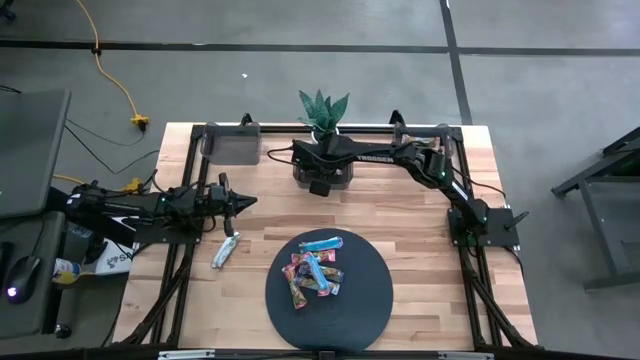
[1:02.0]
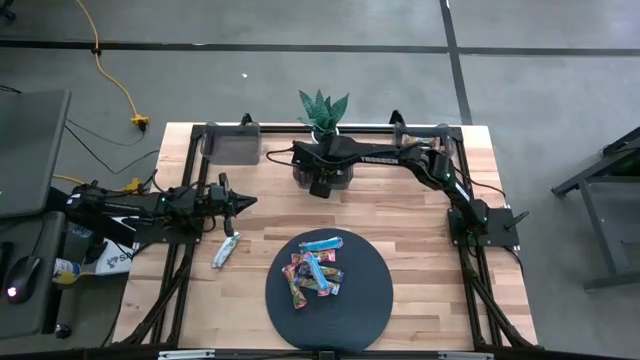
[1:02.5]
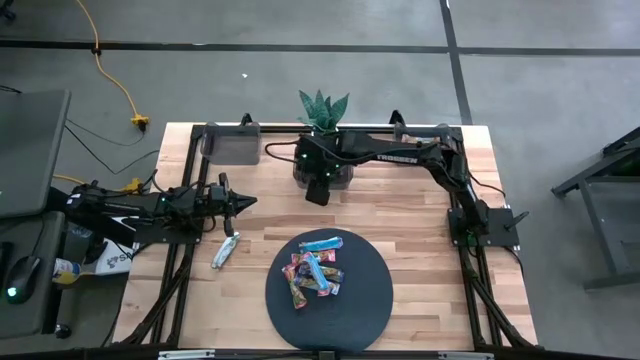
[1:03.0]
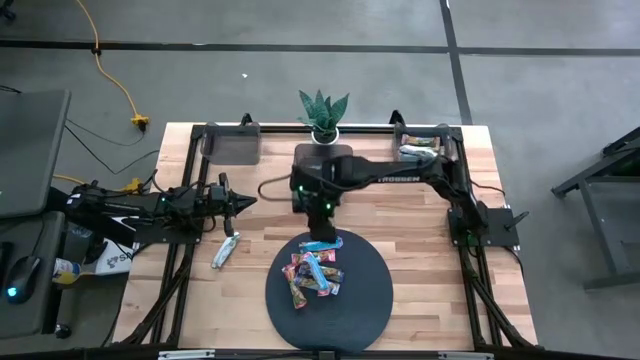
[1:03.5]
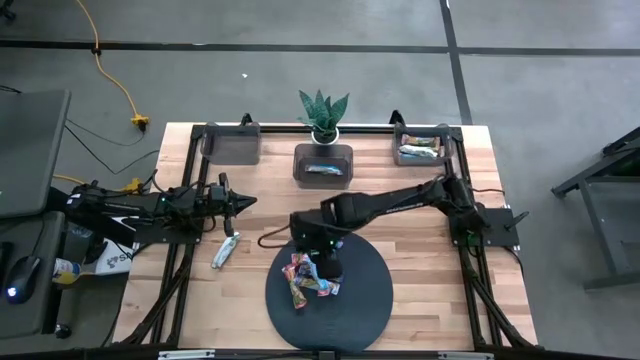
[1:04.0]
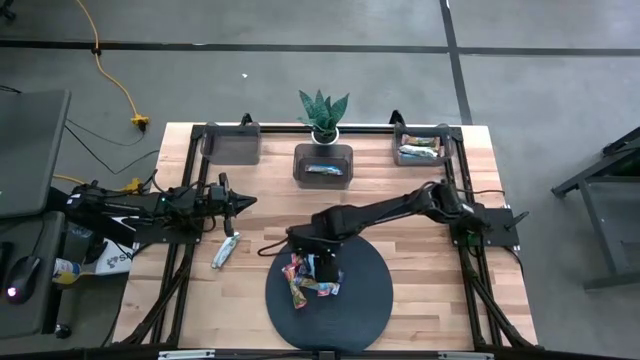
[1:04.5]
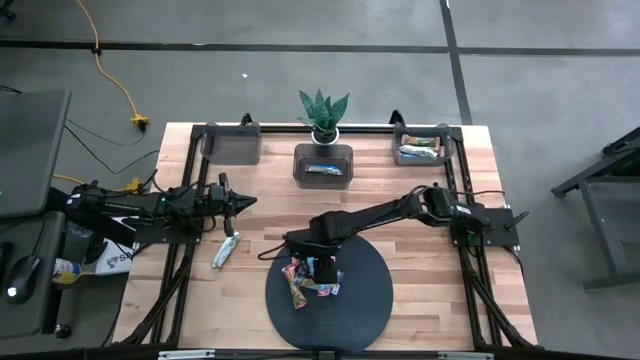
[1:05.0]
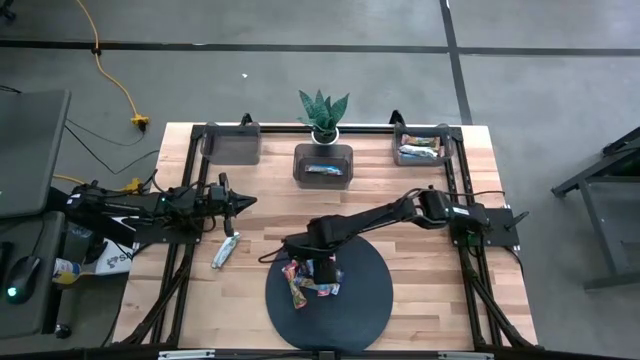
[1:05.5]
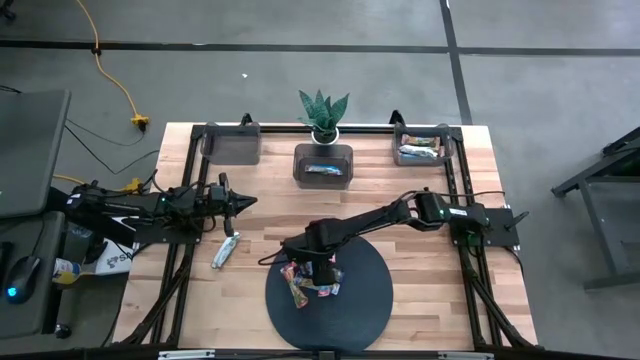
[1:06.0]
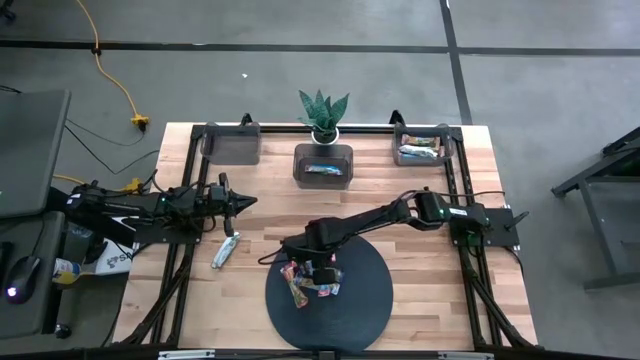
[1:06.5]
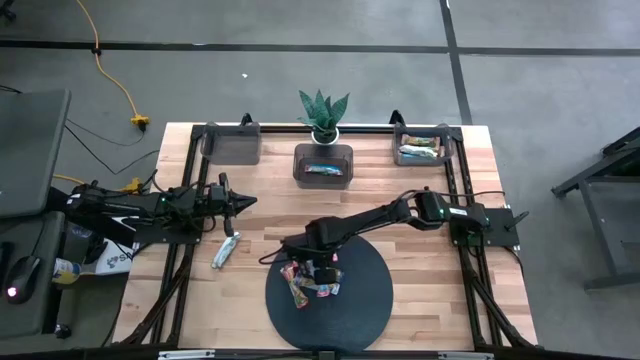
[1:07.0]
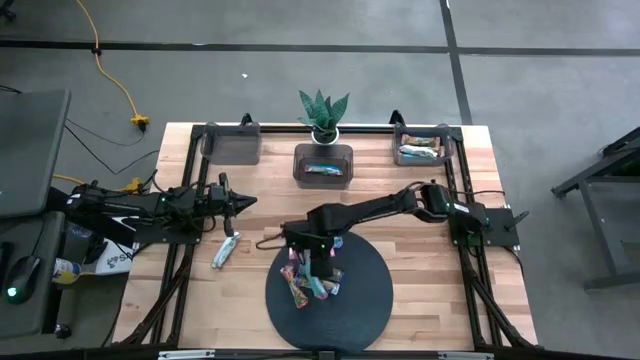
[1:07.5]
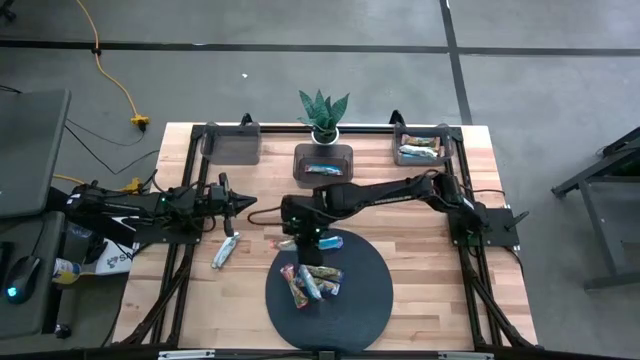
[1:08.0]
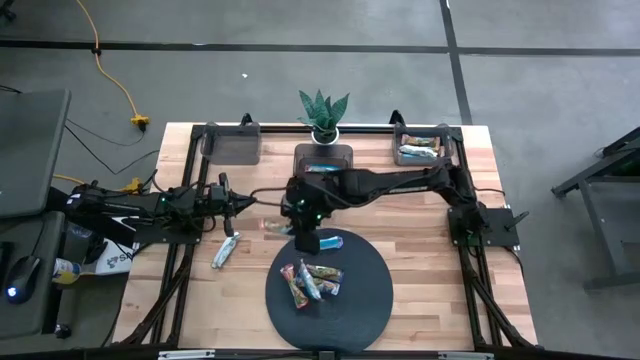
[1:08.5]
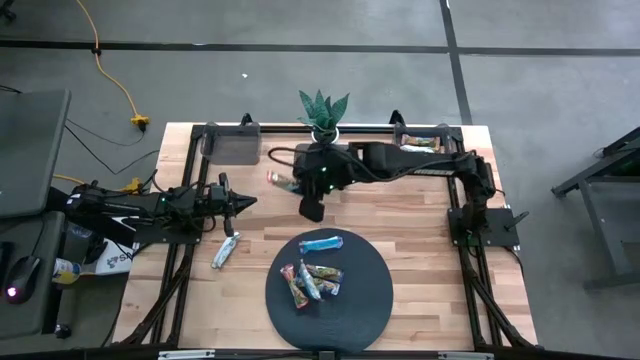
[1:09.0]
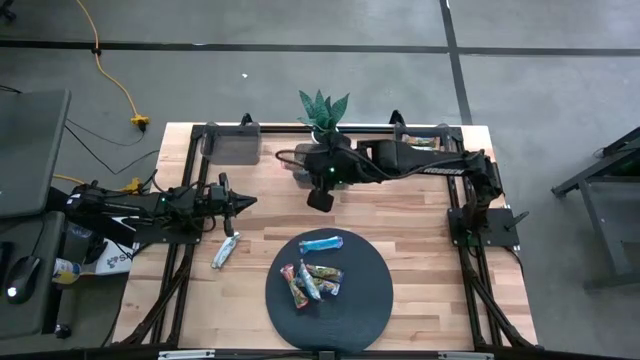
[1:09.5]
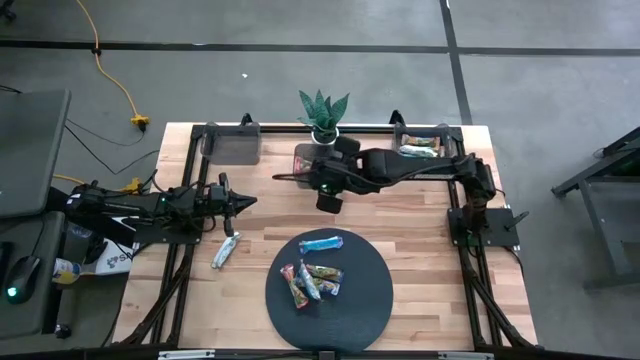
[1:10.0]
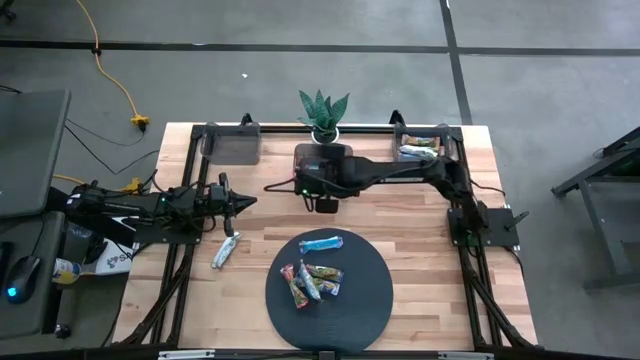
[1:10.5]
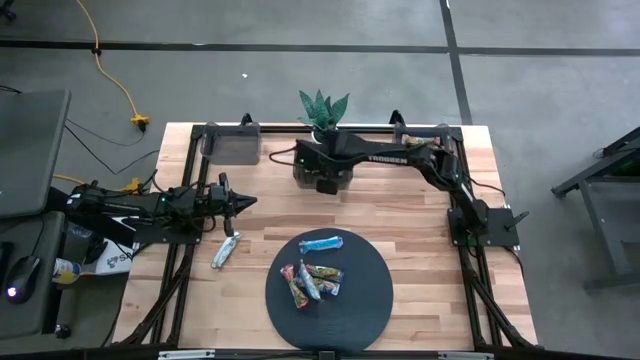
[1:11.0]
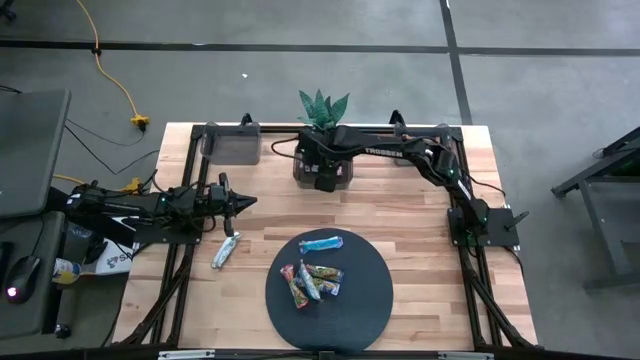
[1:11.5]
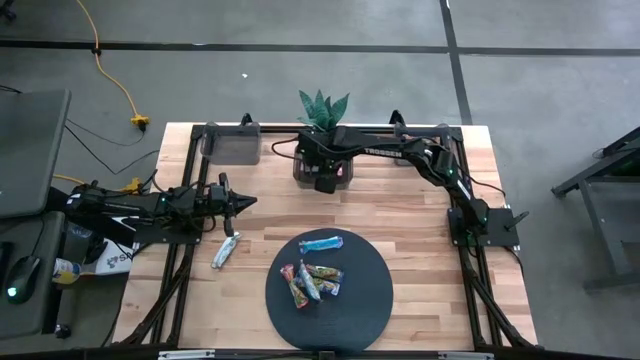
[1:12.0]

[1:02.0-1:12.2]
Task: Pick and place Granola Bars by type
Put the red granola bar into the middle black bin

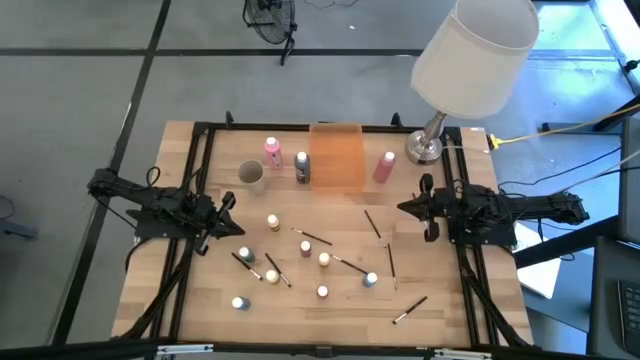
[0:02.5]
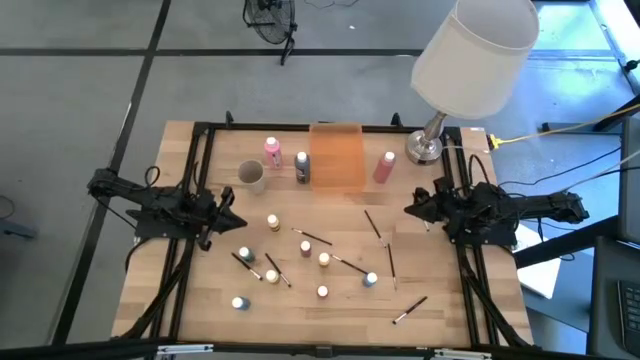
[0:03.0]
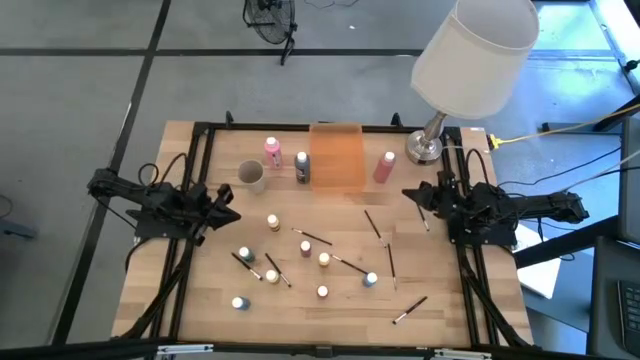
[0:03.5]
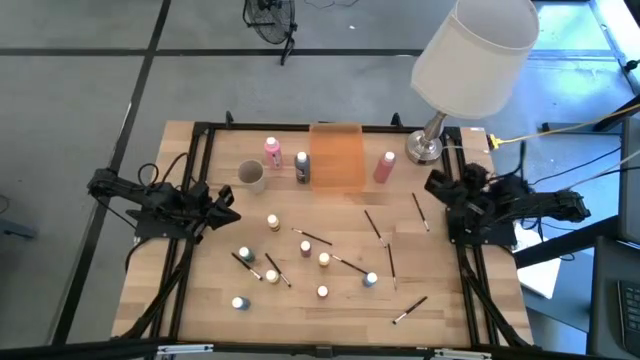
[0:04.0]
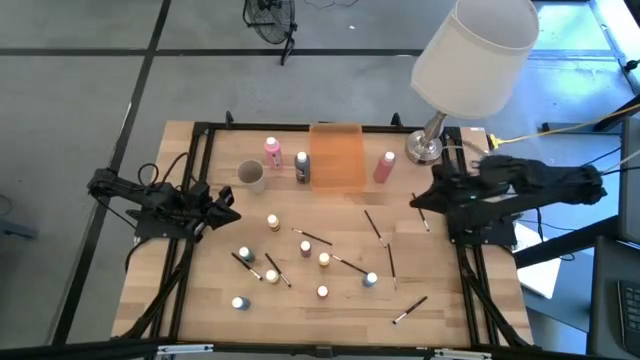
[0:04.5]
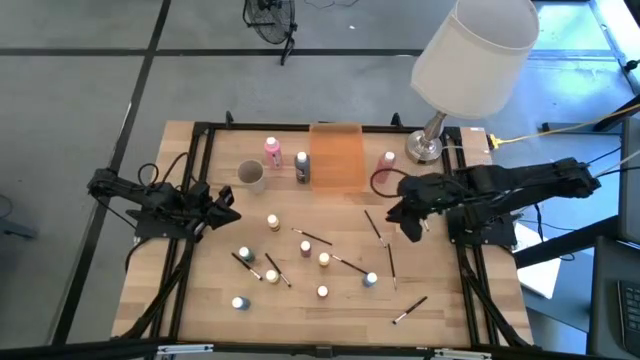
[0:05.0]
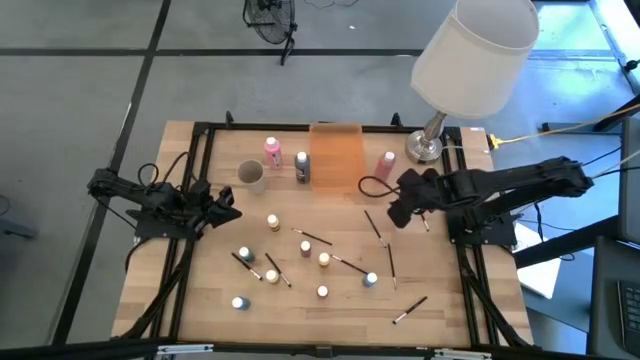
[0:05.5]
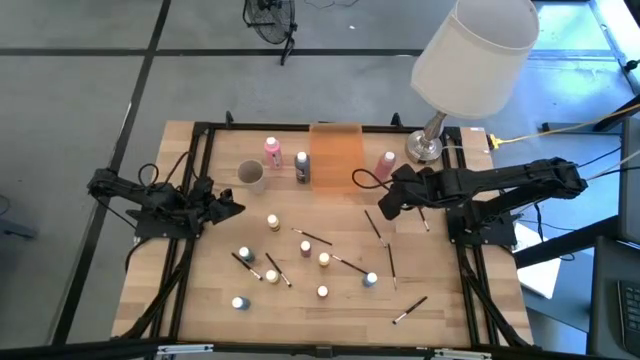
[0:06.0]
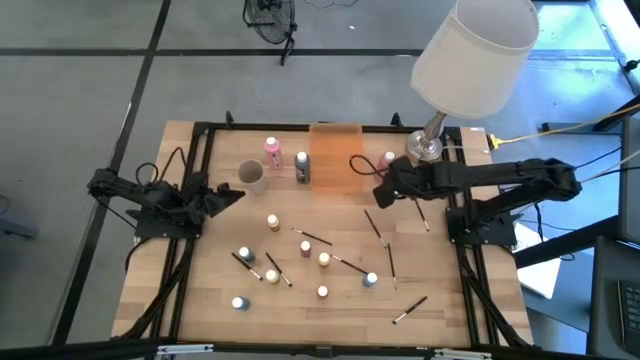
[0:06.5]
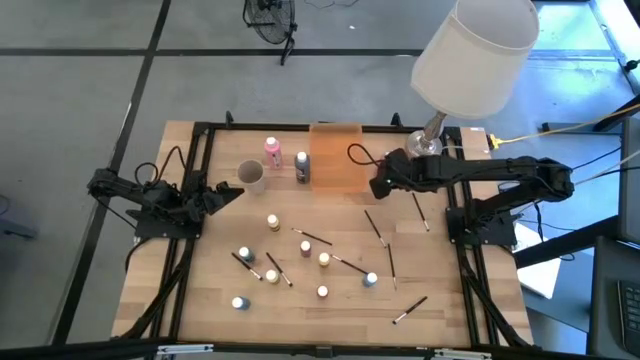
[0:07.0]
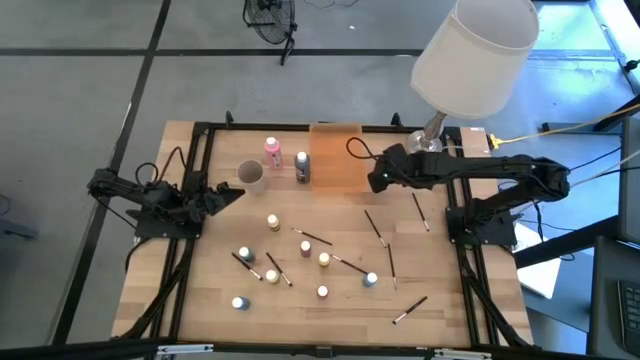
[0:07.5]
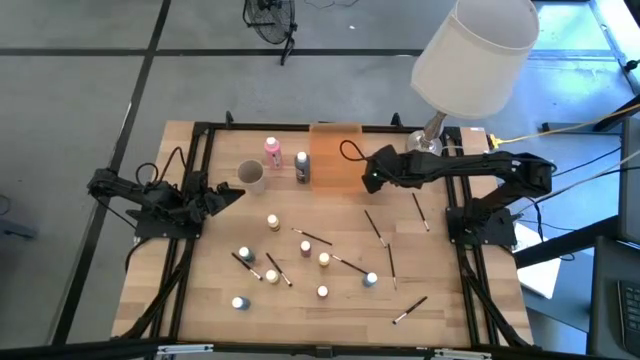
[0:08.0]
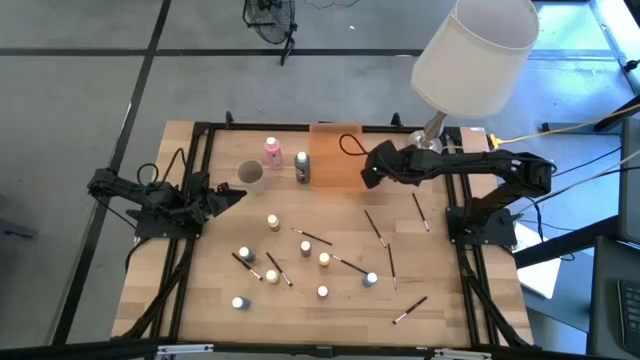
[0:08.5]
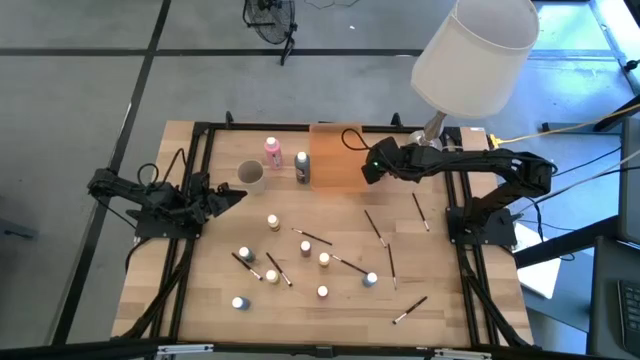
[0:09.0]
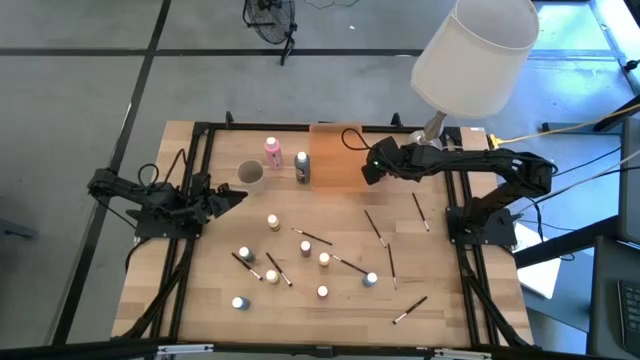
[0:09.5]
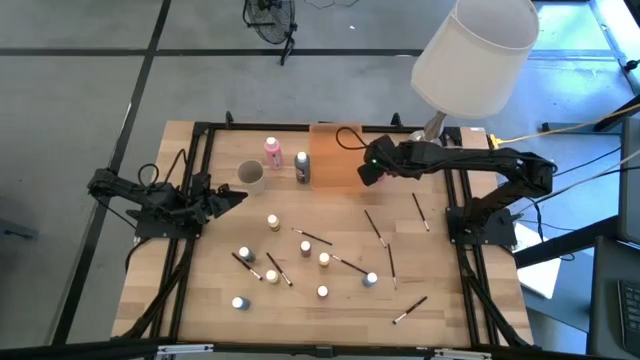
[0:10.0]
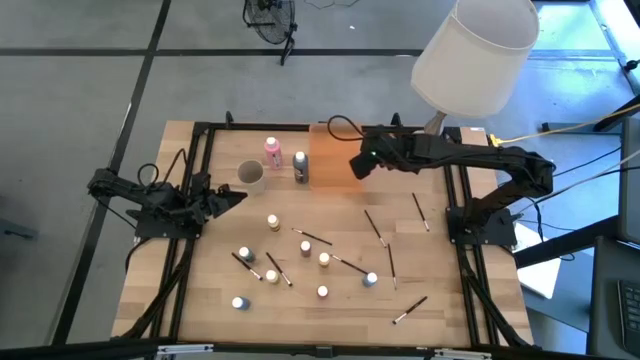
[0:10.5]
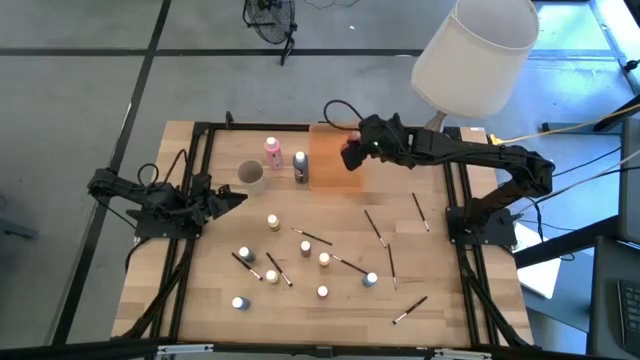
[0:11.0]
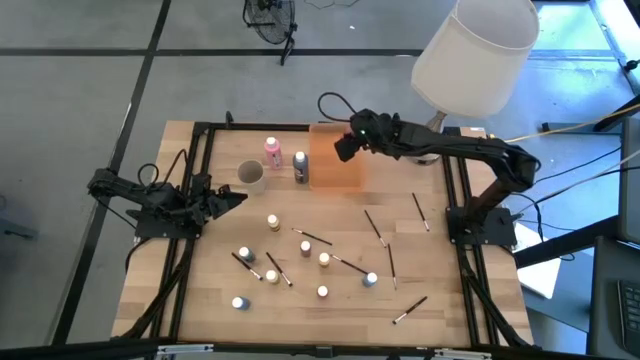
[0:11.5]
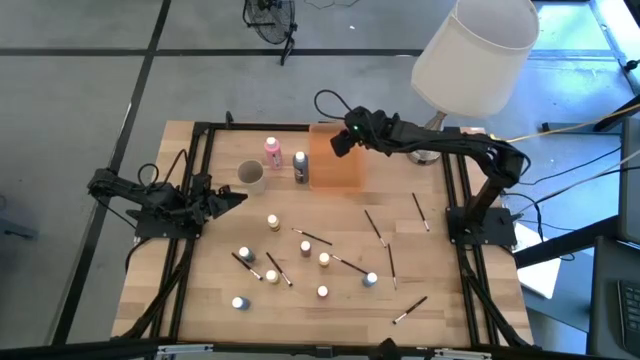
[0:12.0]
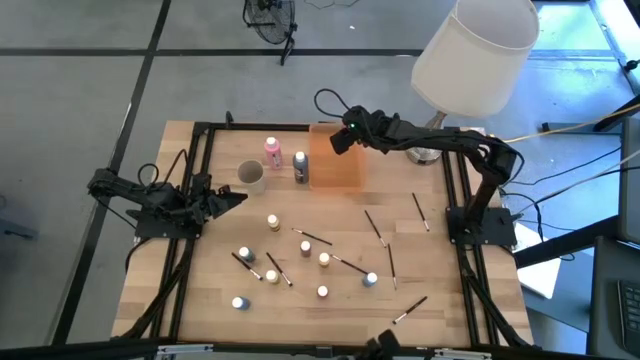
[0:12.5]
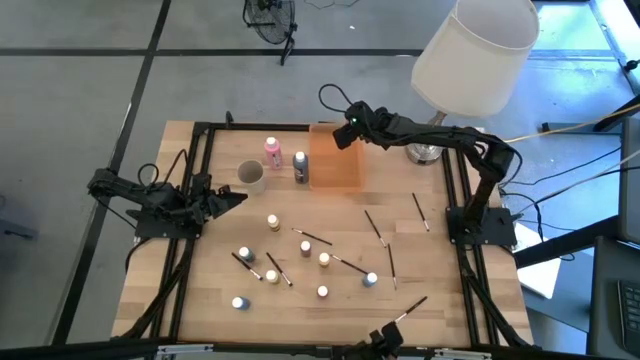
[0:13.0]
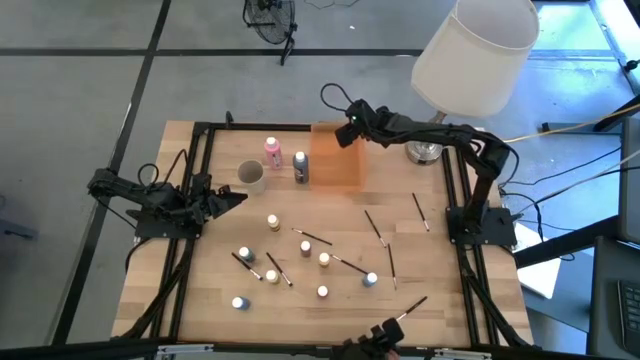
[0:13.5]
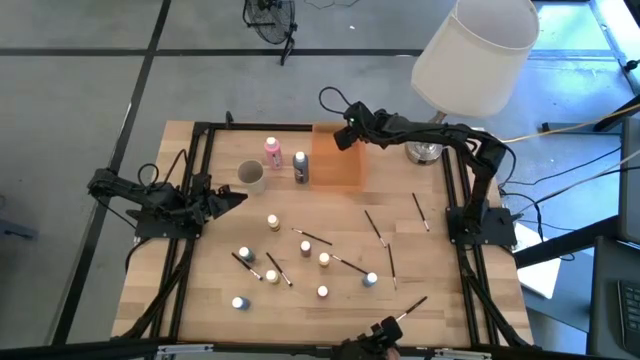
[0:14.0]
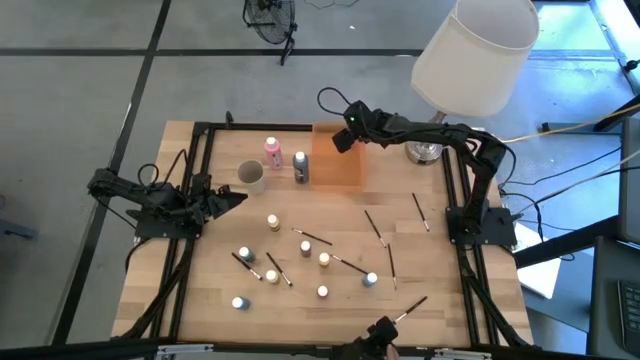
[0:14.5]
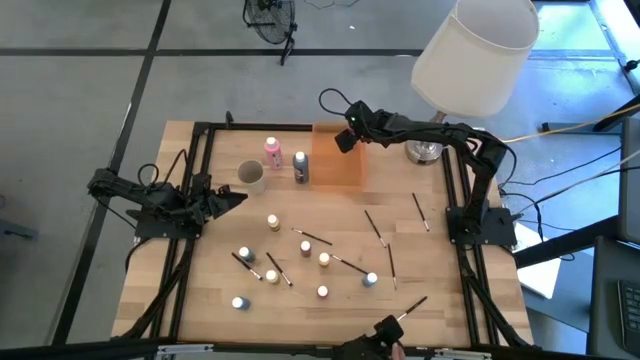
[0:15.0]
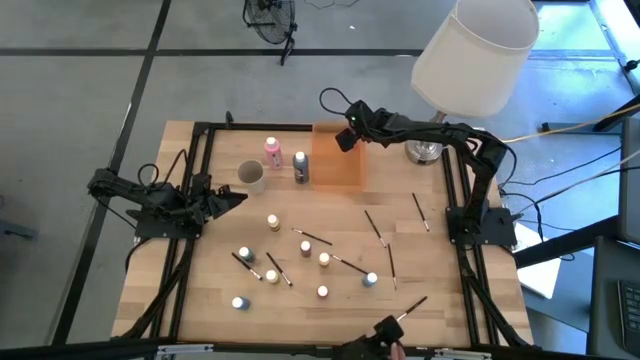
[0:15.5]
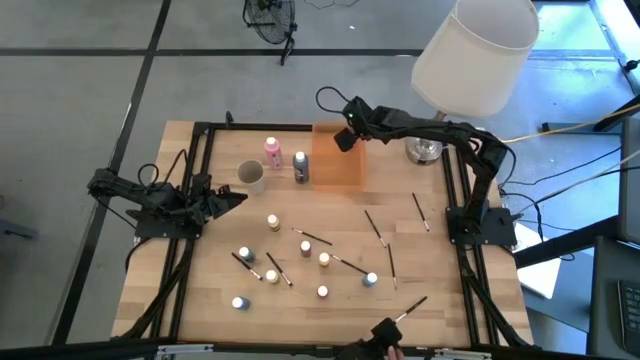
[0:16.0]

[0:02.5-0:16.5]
Task: Pick & Place Paint Supplies
Put the large dark pink paint bottle into the orange bin
